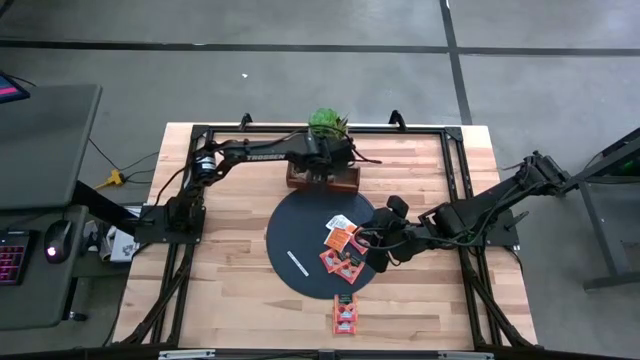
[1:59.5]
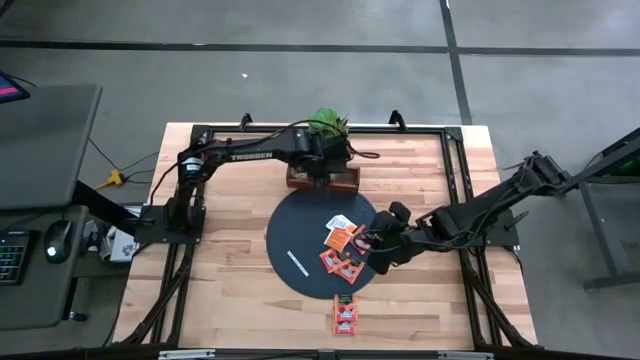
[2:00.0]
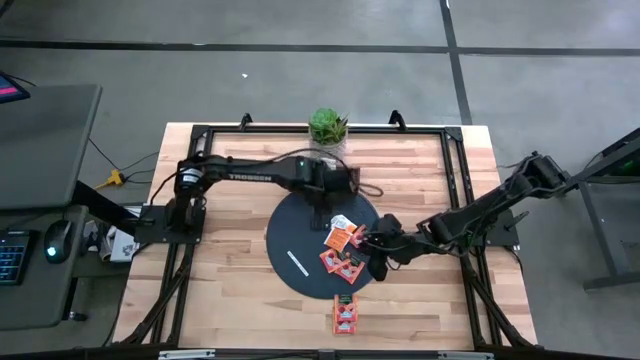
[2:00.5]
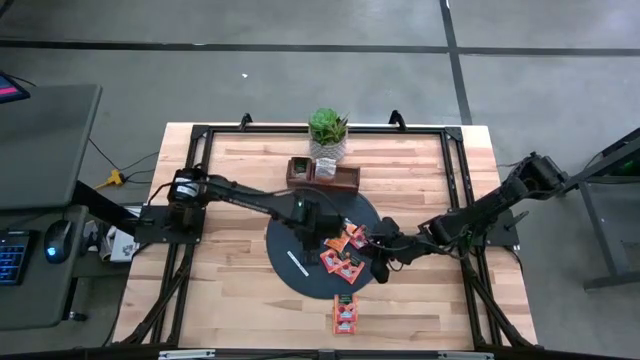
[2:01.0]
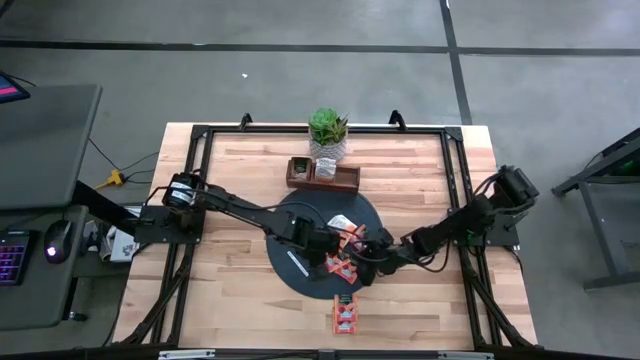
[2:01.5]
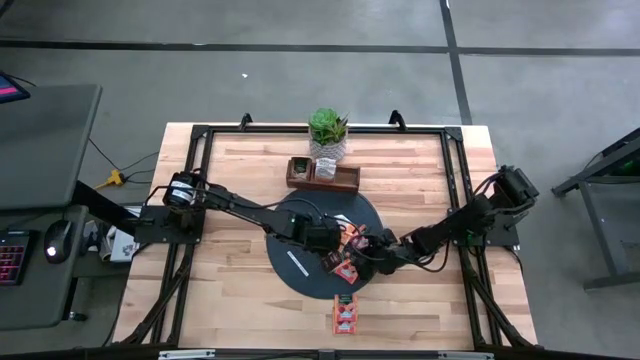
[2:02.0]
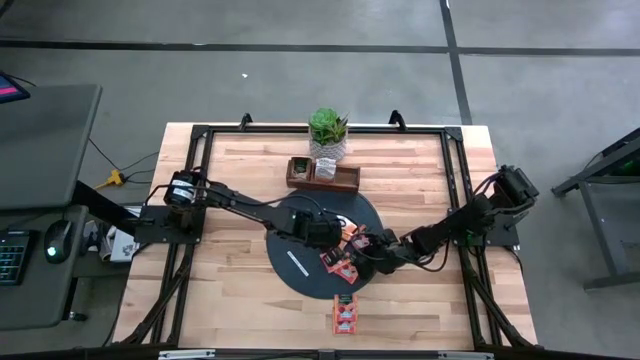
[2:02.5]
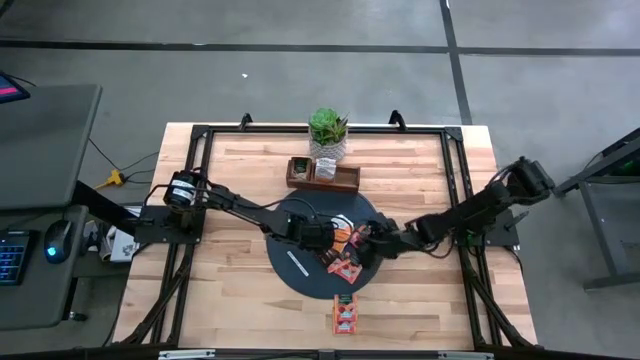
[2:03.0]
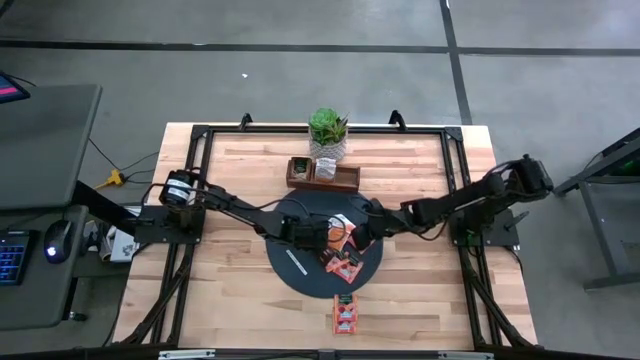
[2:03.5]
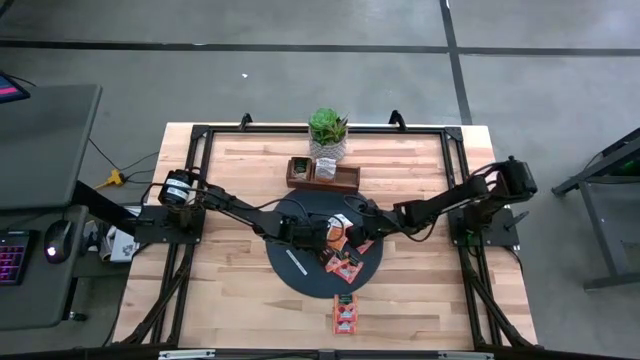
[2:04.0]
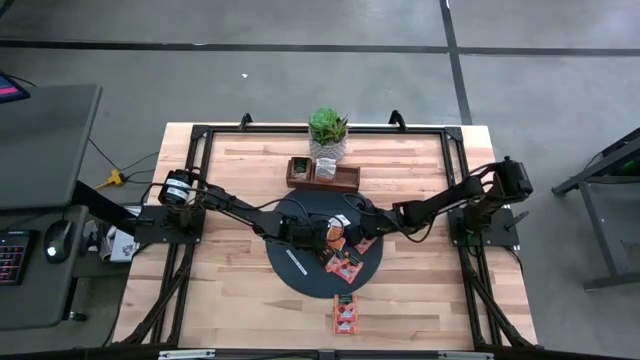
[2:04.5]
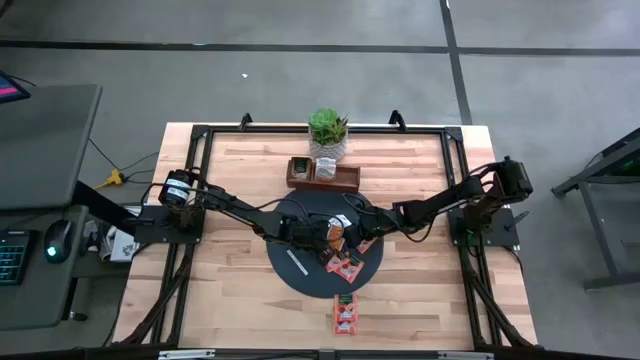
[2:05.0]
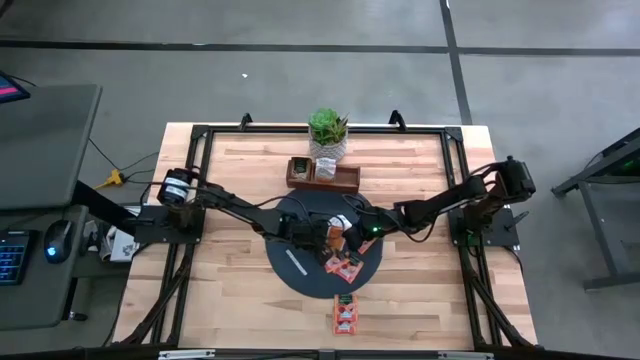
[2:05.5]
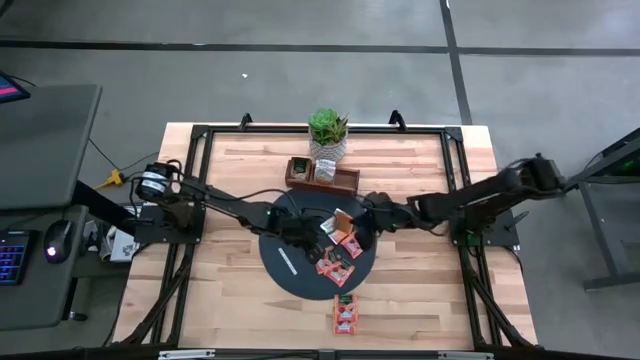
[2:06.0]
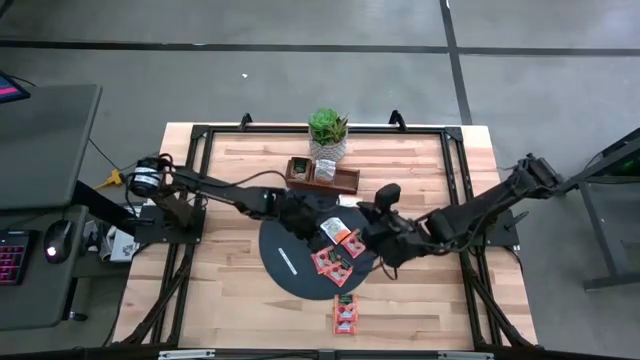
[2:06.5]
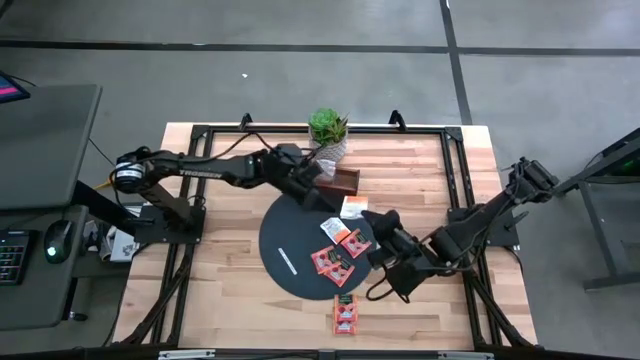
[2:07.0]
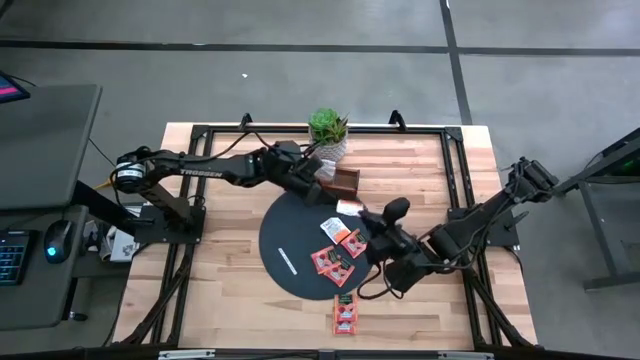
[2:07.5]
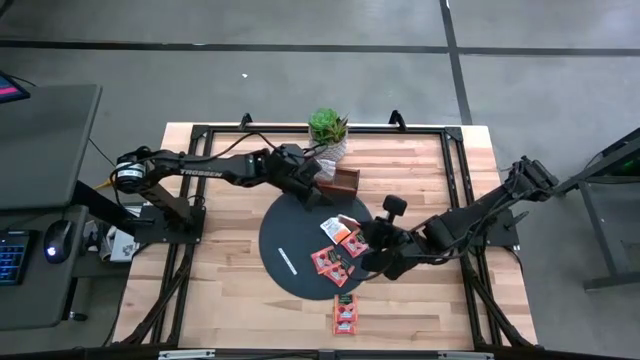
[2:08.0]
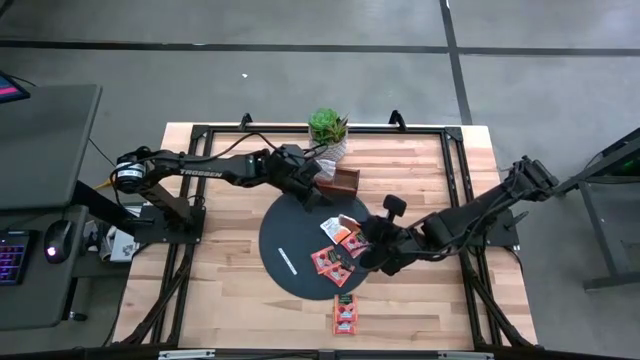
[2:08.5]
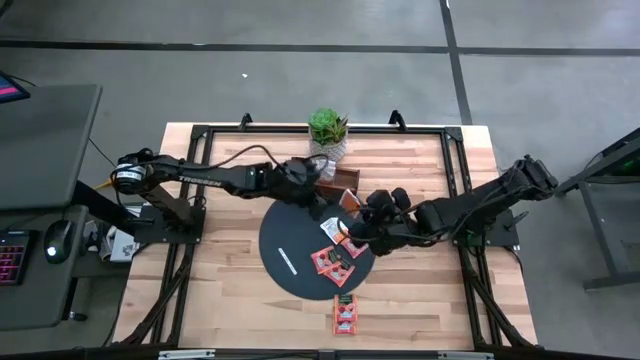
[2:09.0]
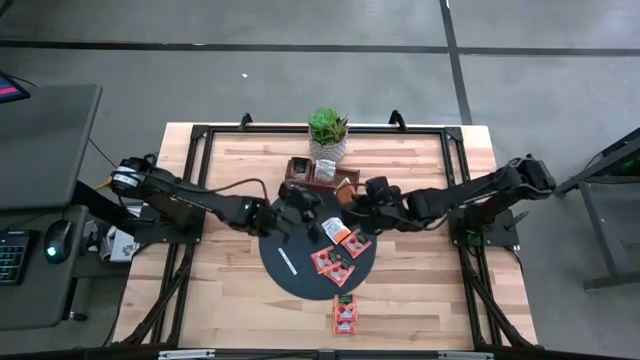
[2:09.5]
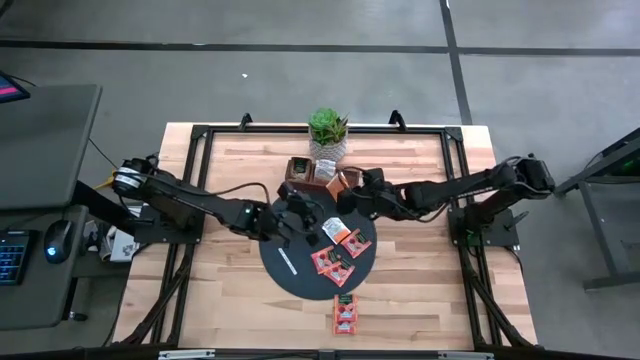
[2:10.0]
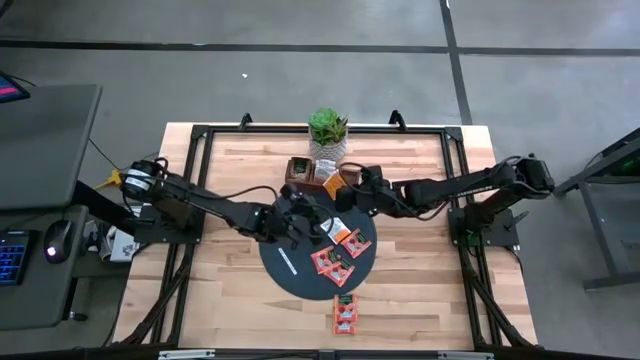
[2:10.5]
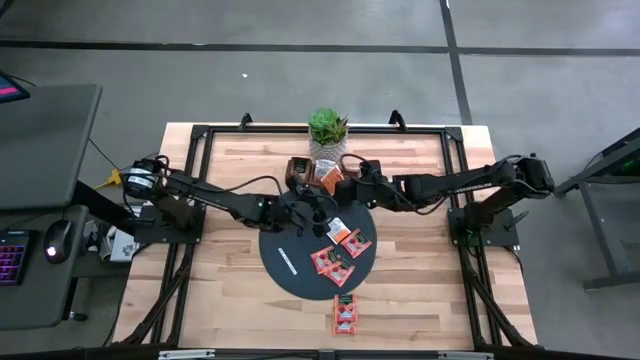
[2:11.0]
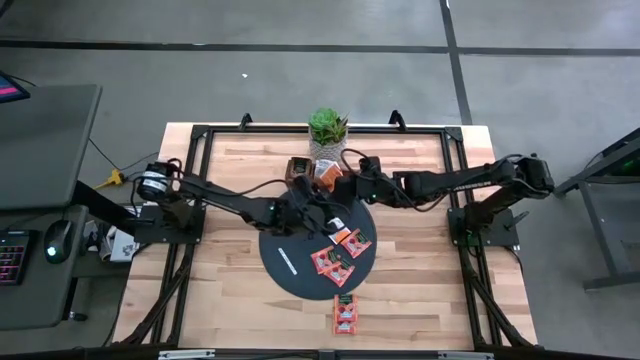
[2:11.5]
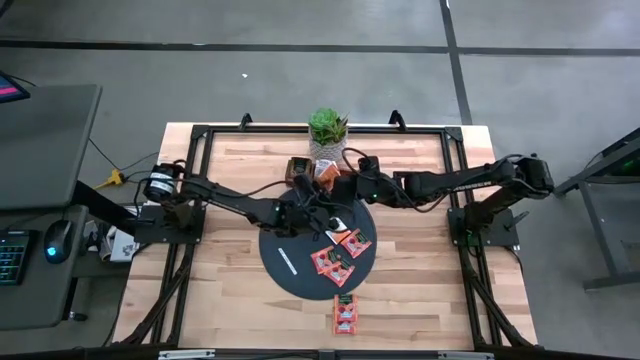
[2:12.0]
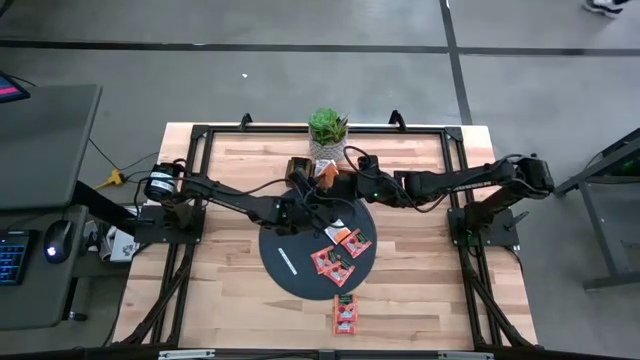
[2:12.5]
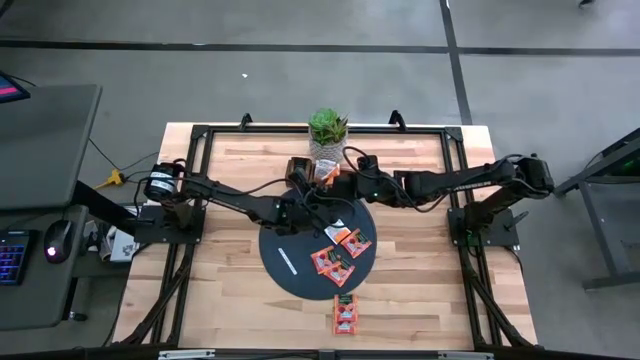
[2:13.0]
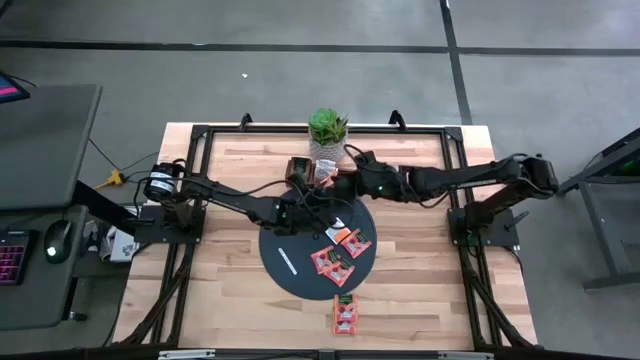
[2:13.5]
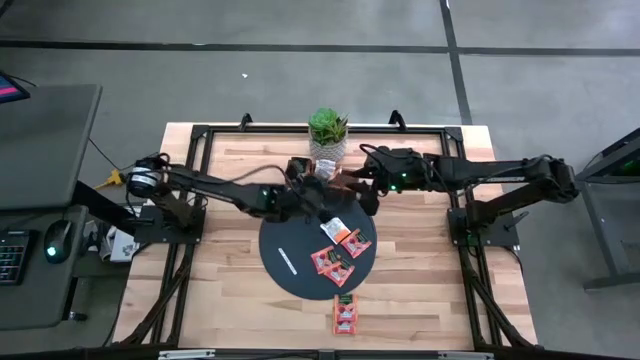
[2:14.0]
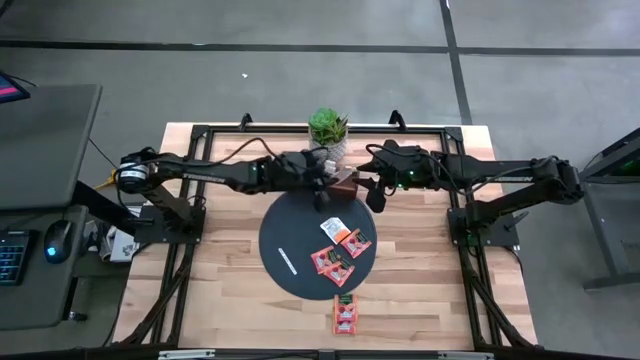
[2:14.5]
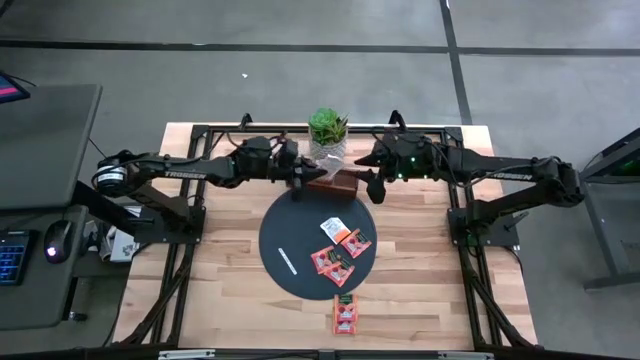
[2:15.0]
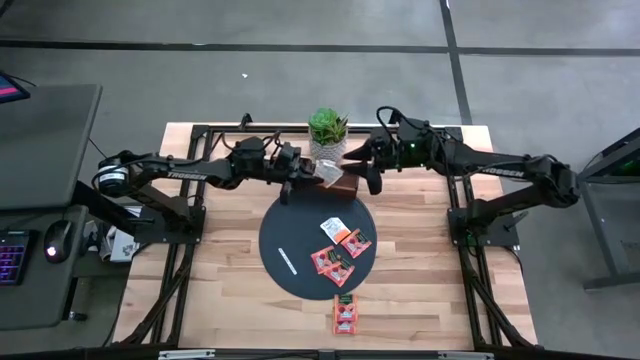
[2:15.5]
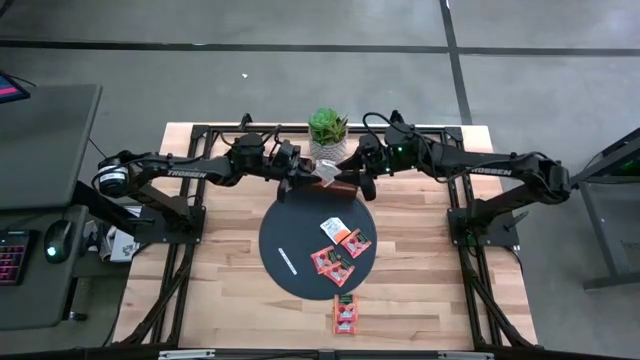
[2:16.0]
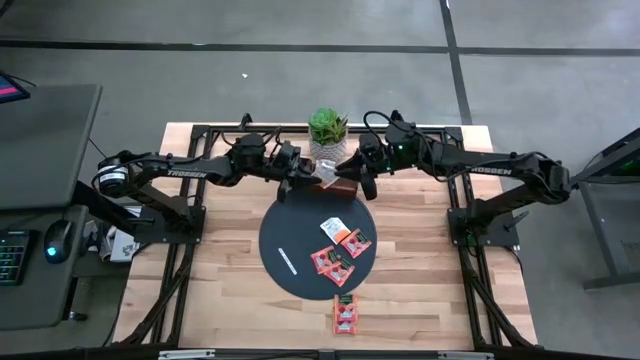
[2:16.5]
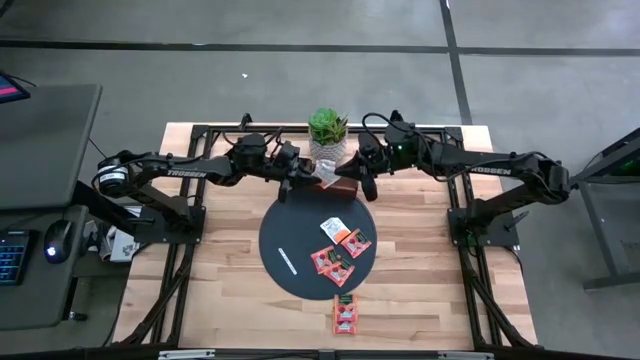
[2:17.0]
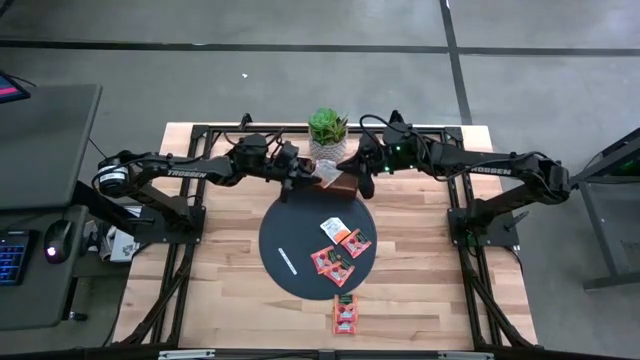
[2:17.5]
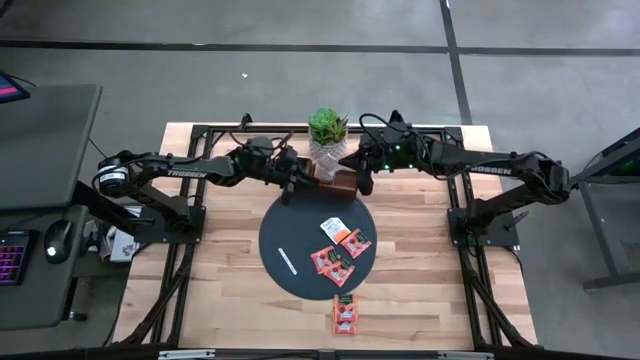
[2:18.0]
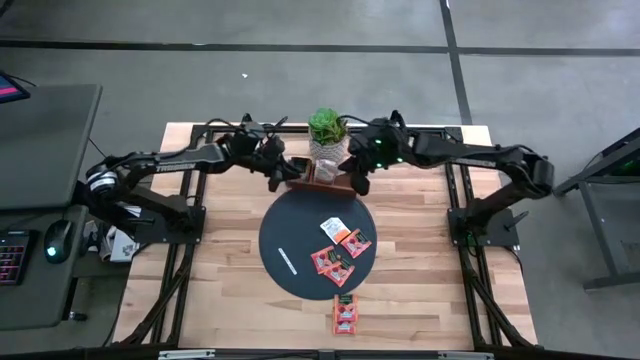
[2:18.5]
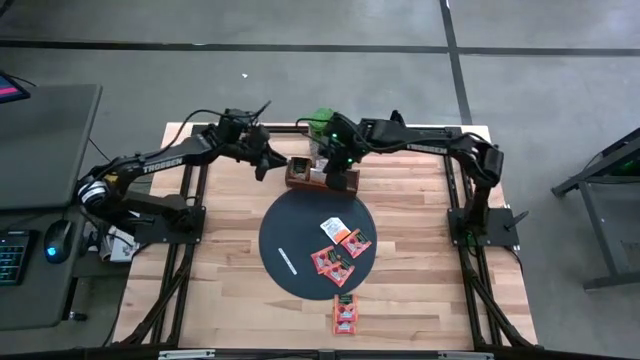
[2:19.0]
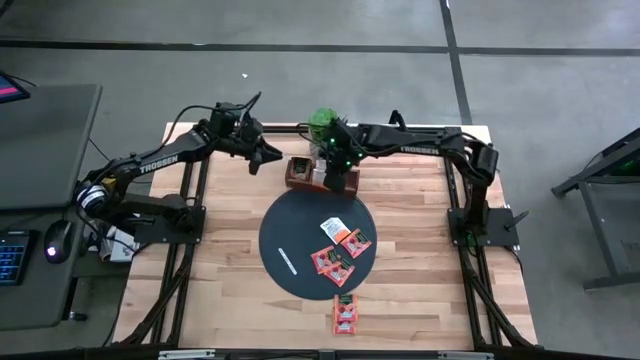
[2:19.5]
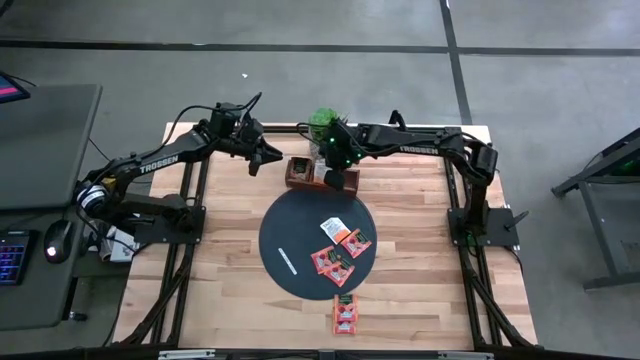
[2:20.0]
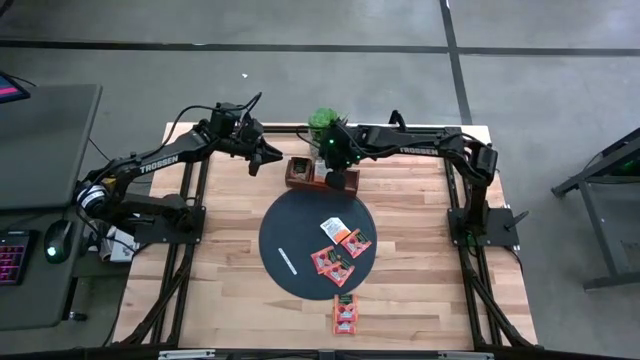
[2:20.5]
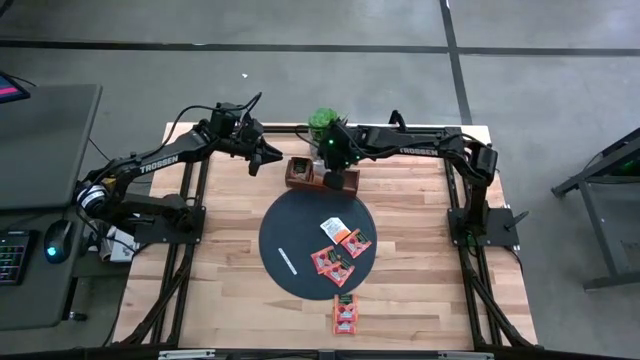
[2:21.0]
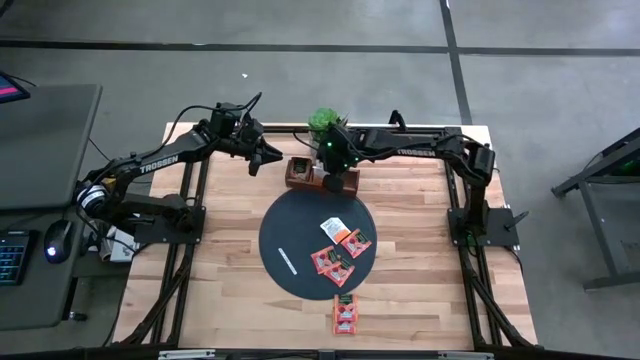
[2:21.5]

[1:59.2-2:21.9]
Task: Pick & Place Tea
Put the white tea bag into the middle section of the wooden organizer
